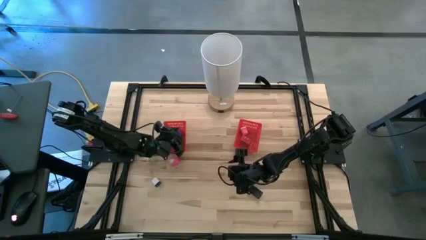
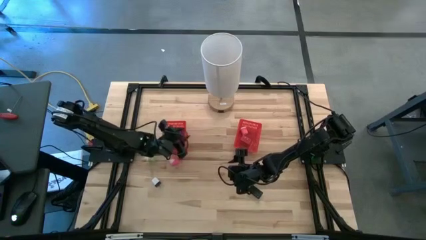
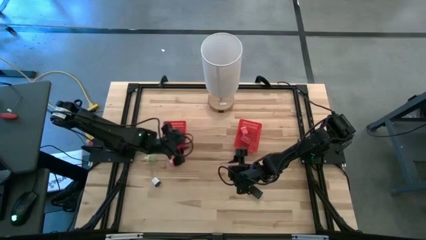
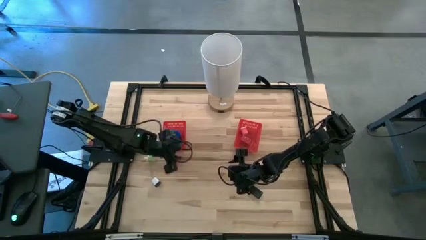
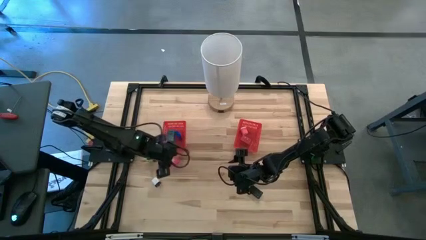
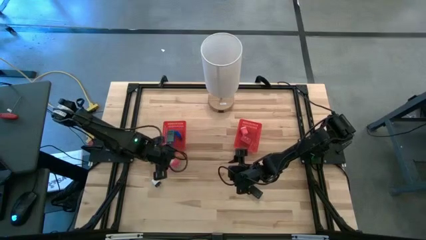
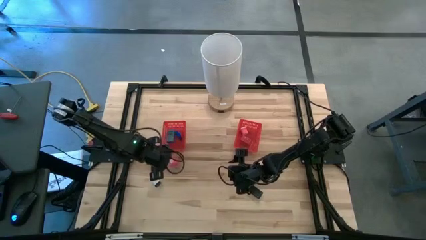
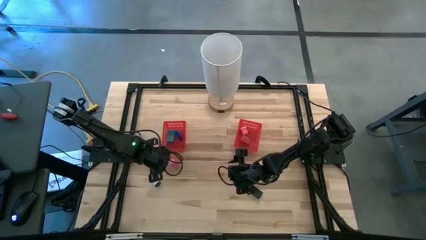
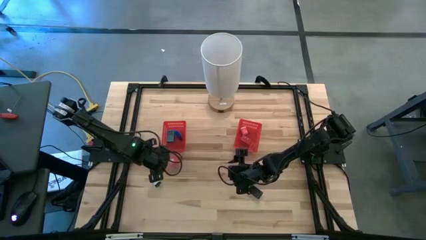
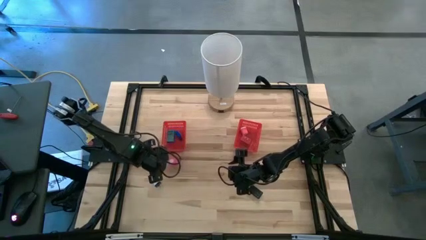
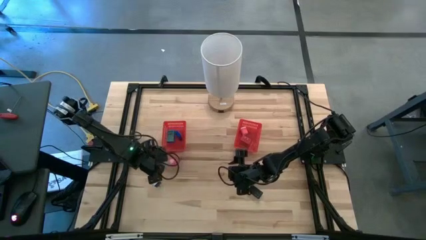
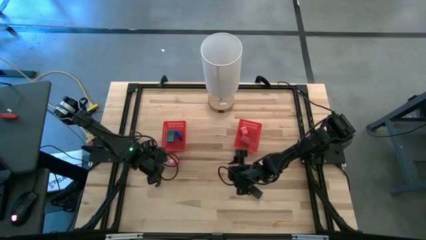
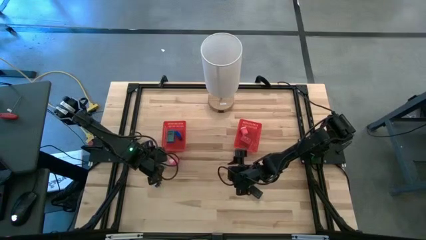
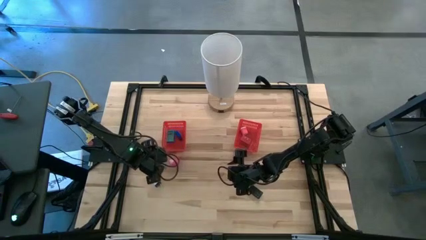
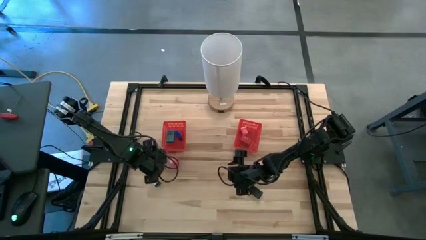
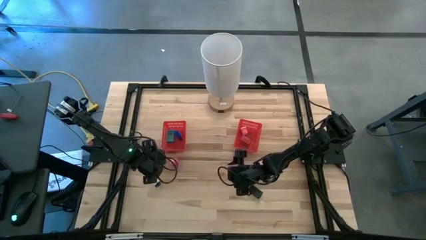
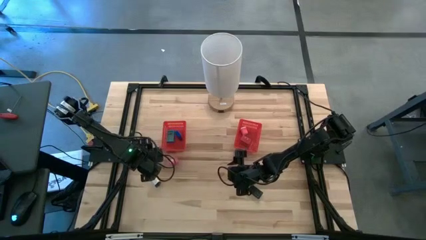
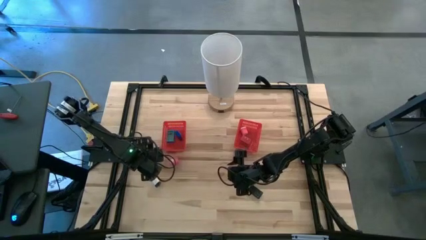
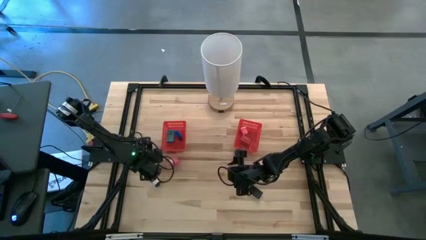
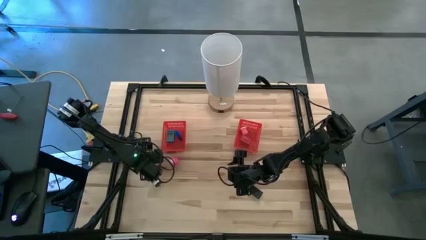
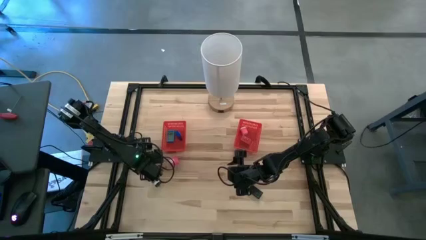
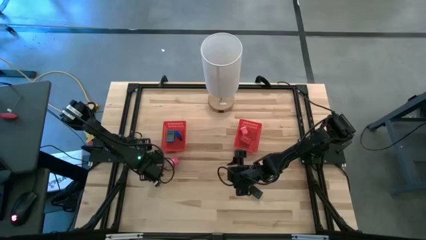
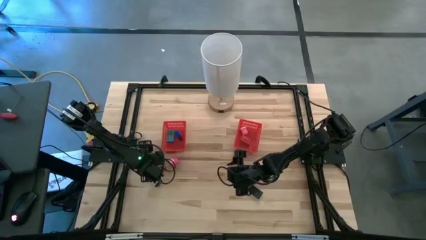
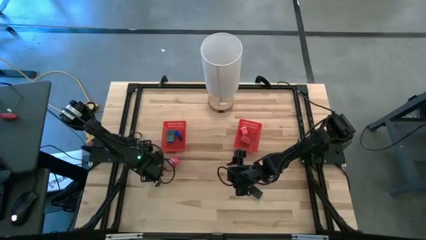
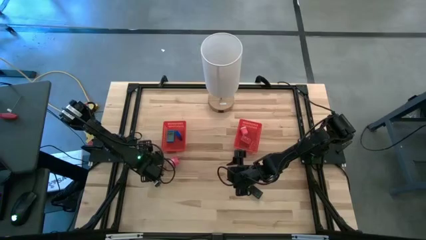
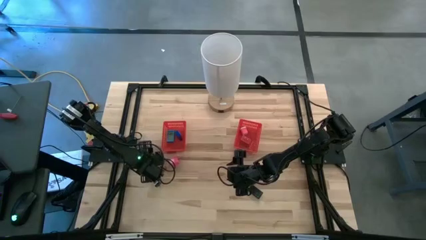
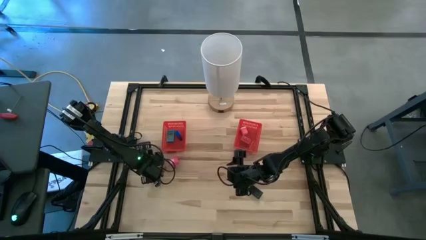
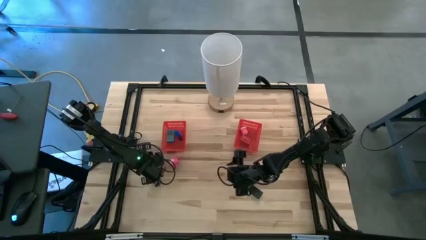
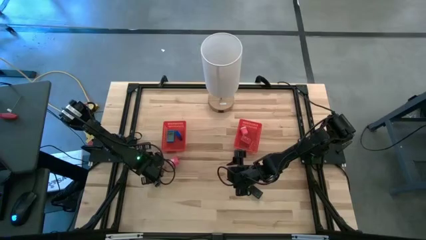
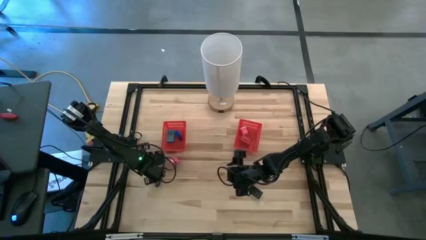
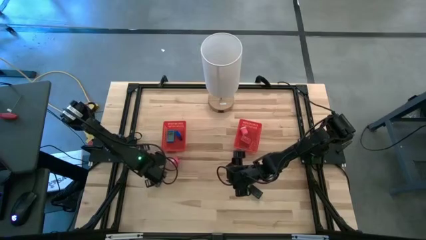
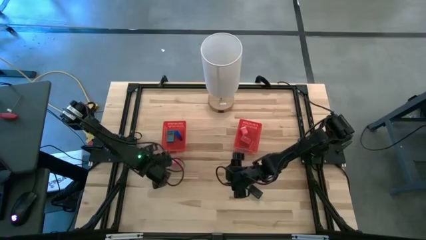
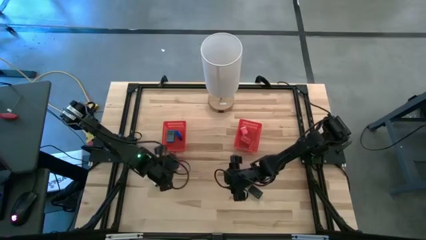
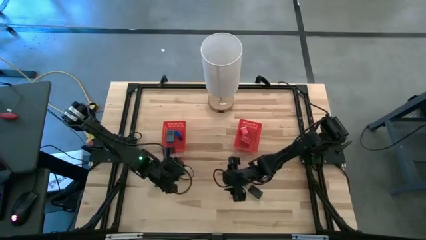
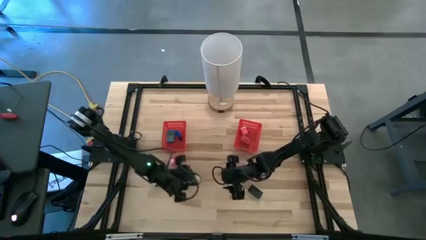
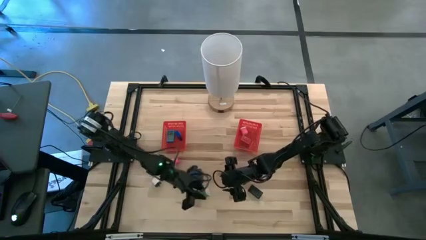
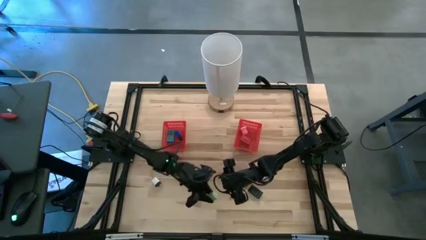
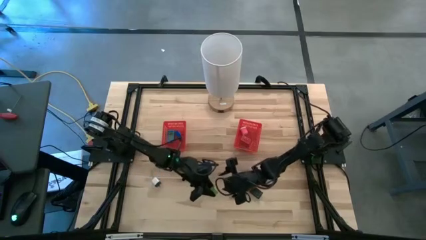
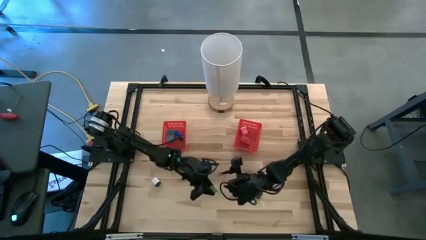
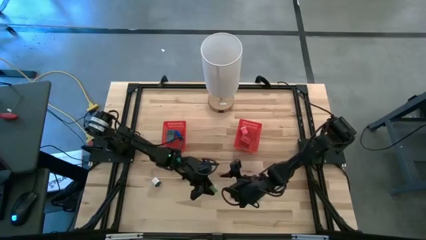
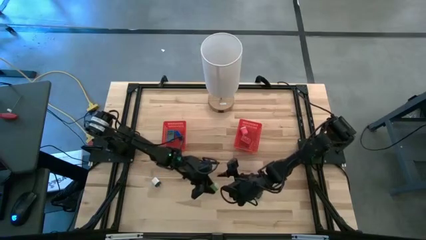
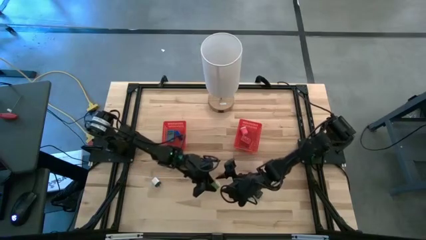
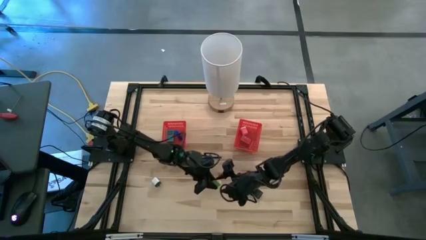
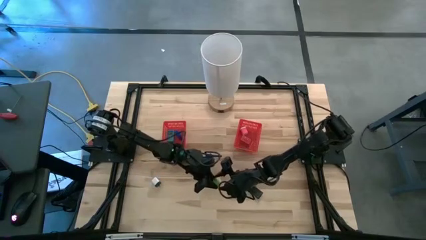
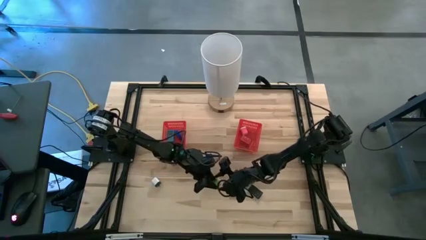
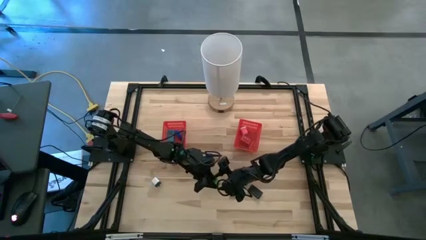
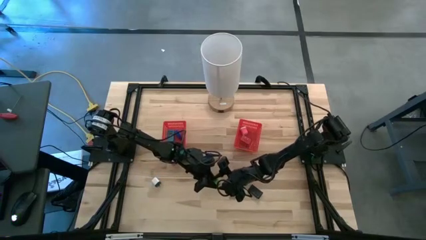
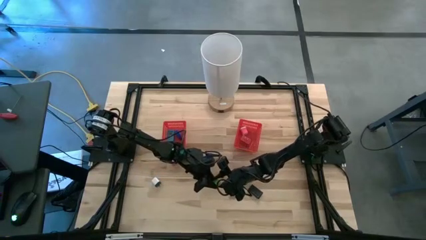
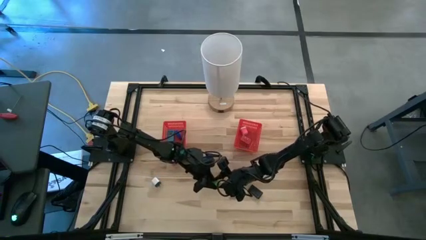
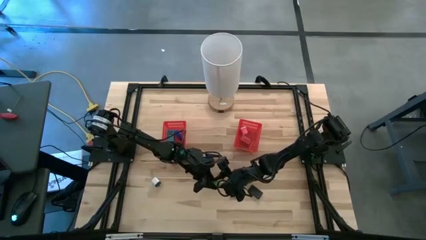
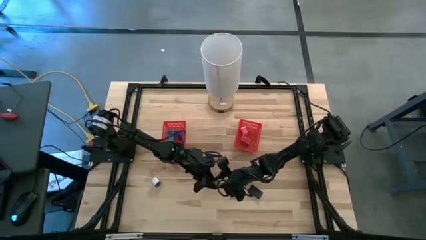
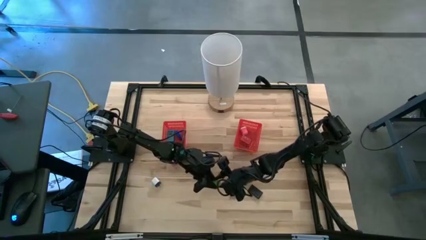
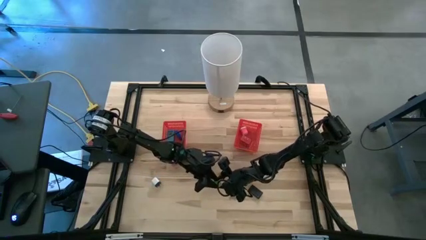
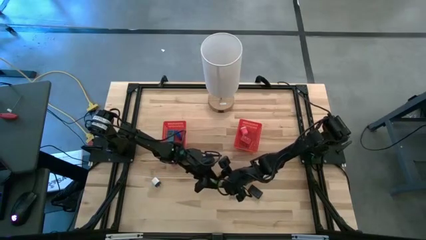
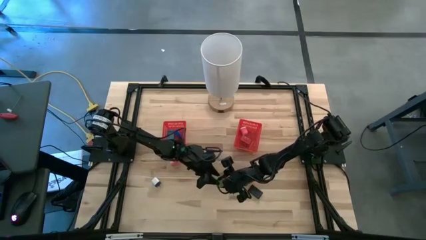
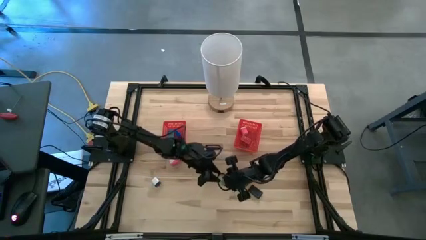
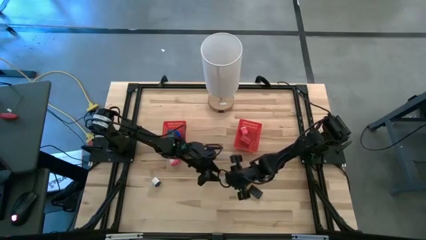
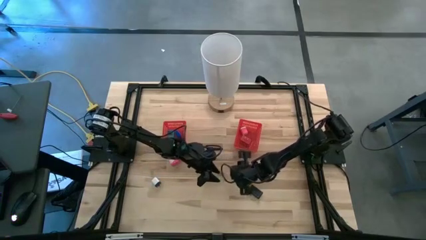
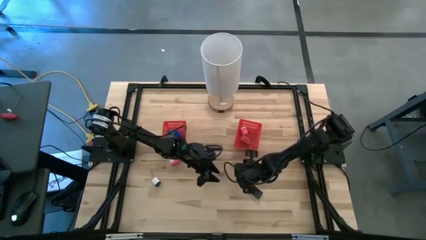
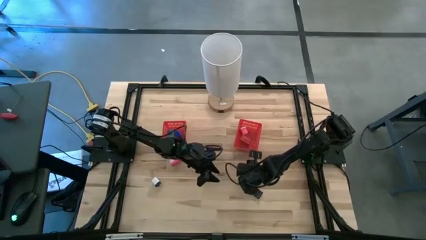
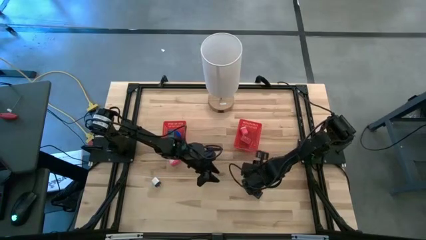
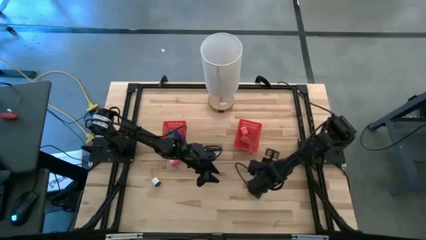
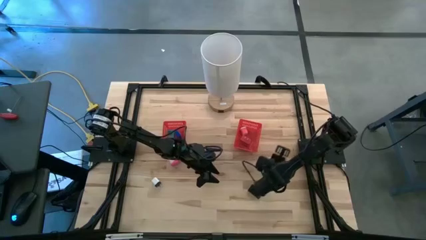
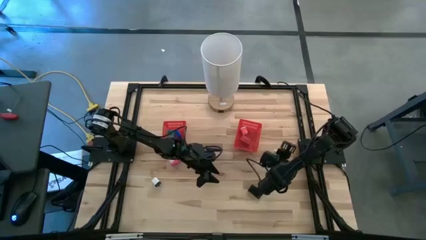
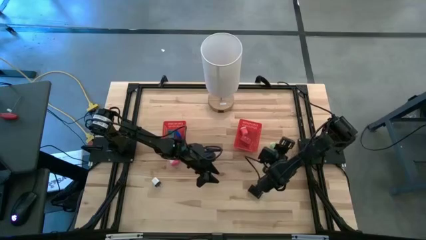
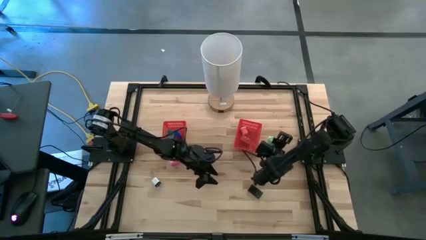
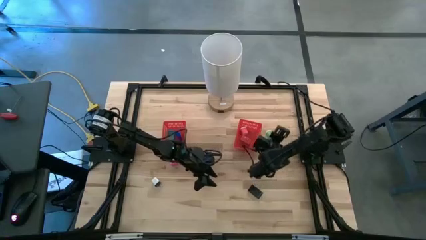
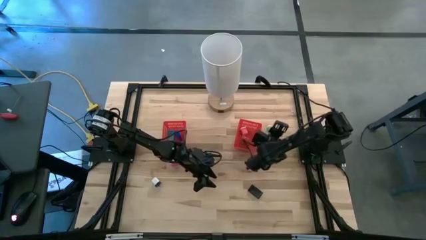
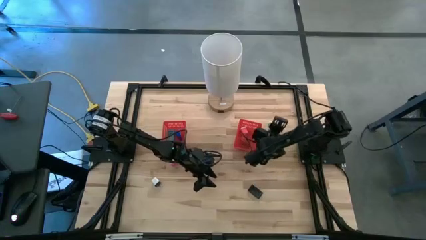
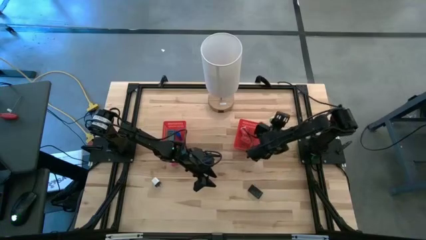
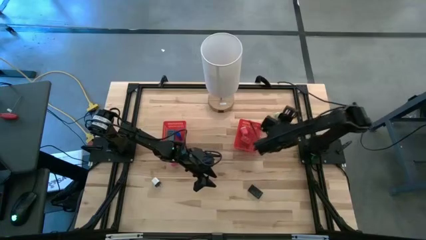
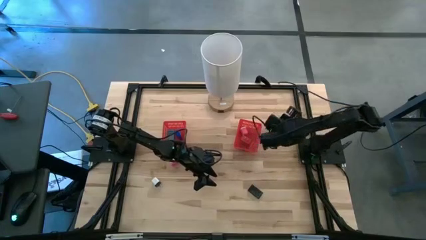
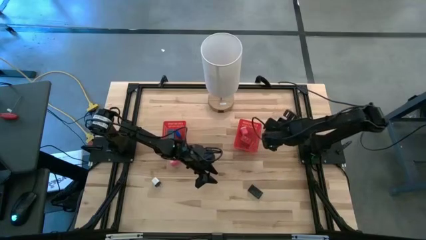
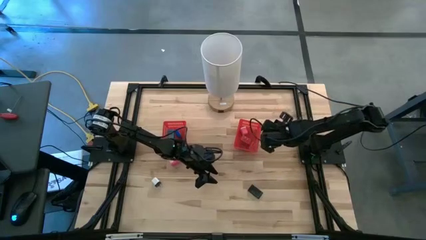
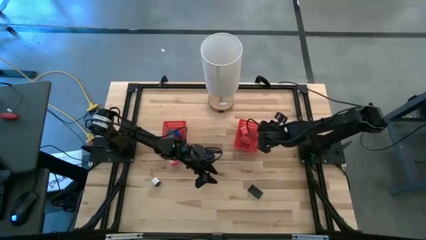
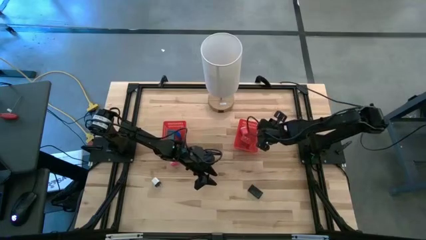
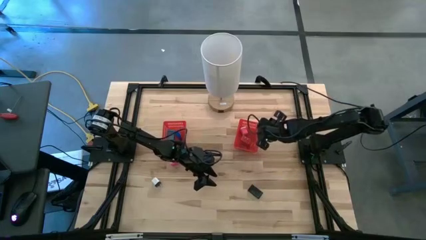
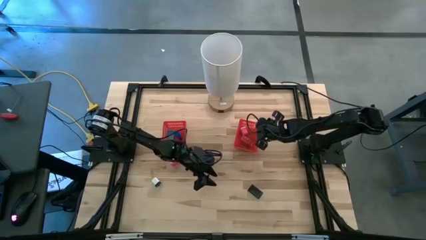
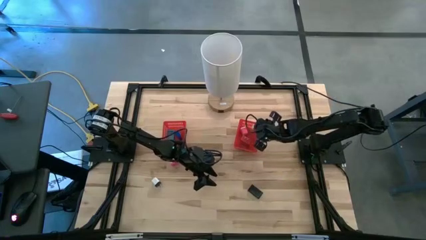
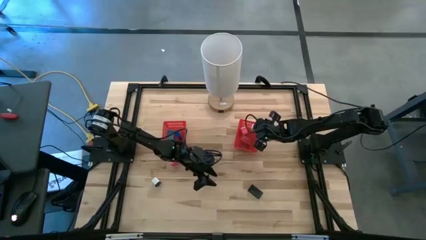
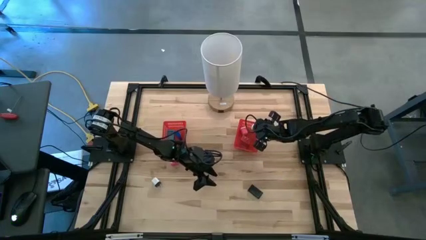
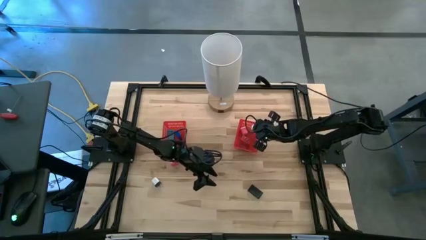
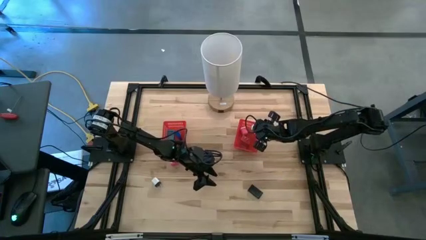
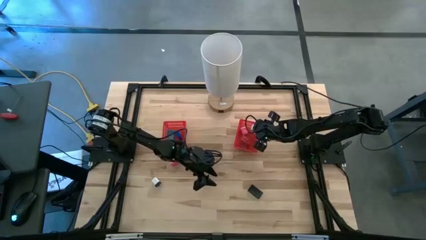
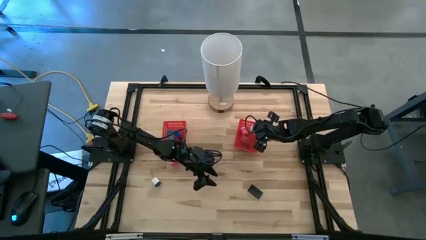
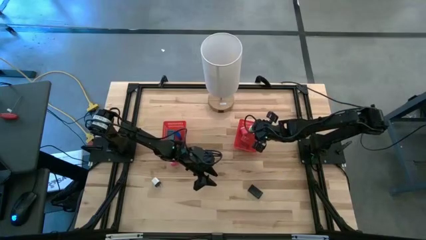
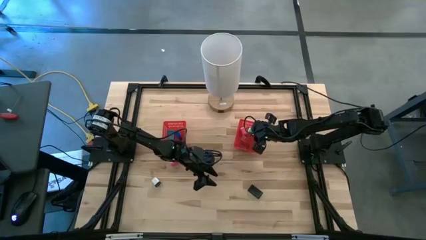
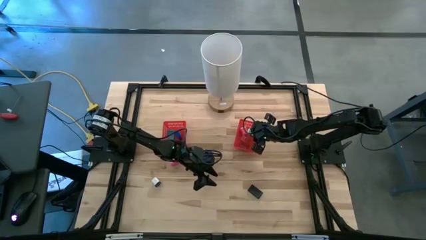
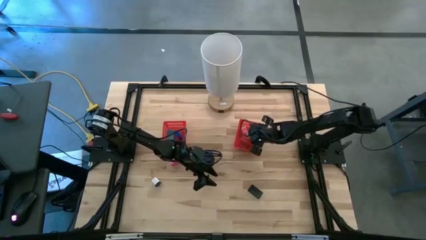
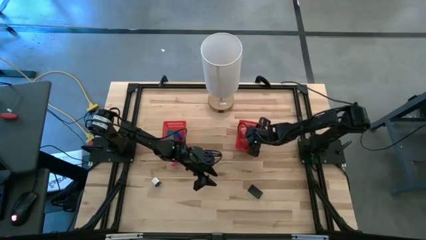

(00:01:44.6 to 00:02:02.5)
Task: Pick & Place Office items
Put the green charger adapter into the right red bin
